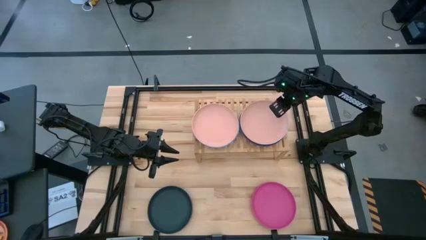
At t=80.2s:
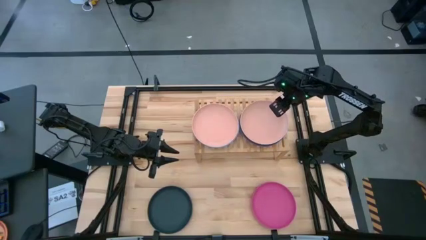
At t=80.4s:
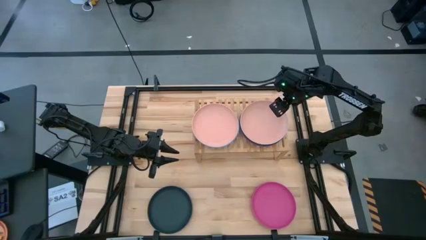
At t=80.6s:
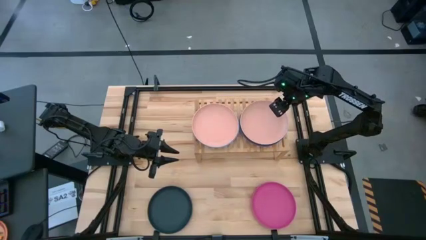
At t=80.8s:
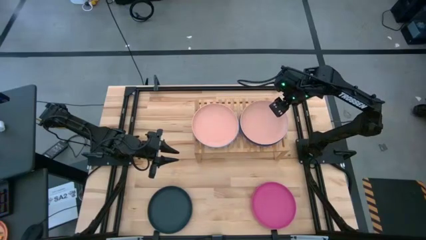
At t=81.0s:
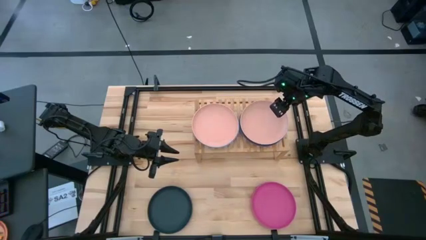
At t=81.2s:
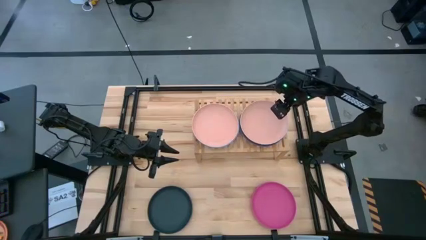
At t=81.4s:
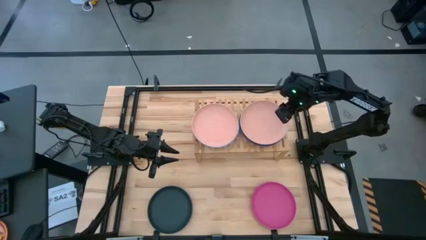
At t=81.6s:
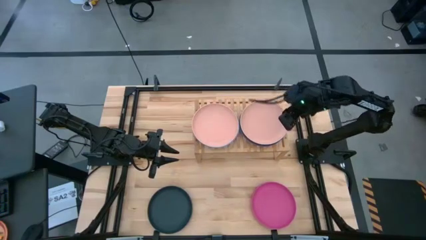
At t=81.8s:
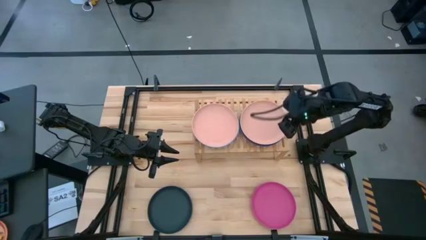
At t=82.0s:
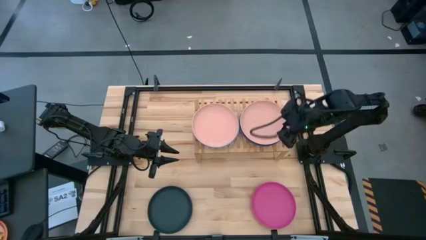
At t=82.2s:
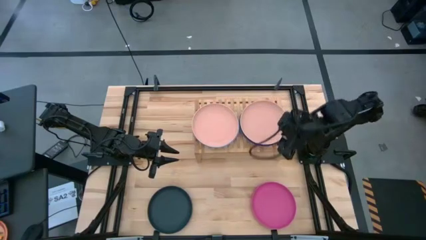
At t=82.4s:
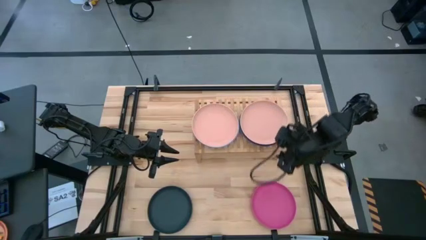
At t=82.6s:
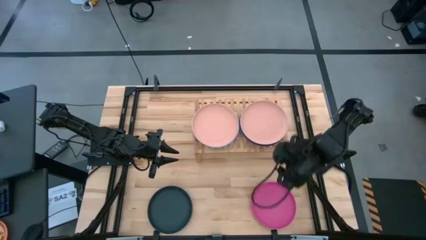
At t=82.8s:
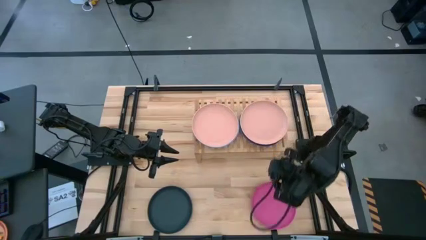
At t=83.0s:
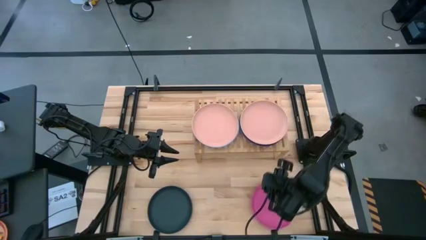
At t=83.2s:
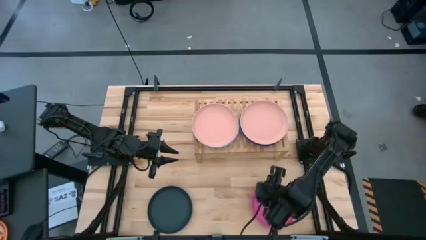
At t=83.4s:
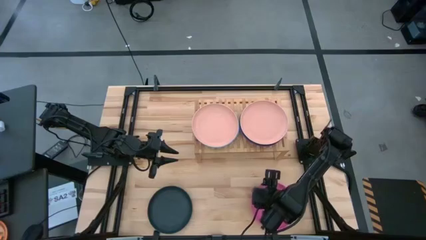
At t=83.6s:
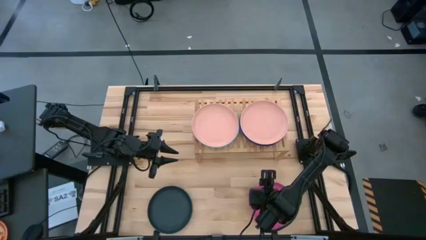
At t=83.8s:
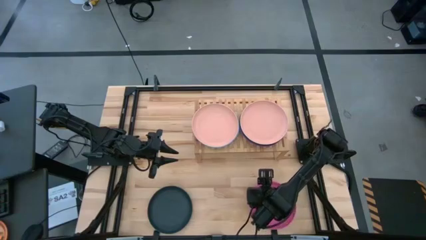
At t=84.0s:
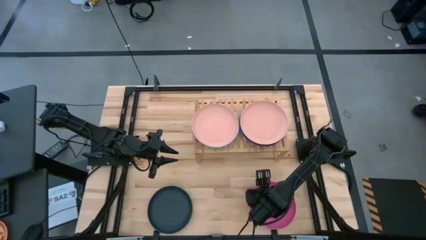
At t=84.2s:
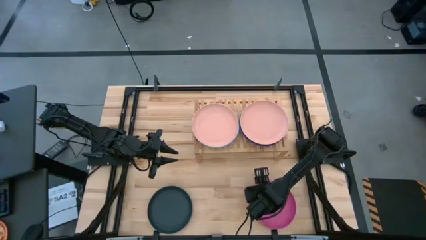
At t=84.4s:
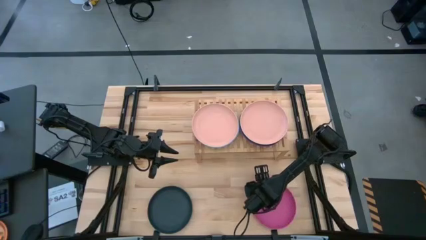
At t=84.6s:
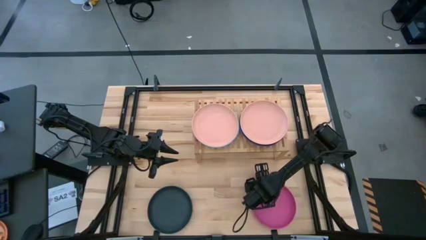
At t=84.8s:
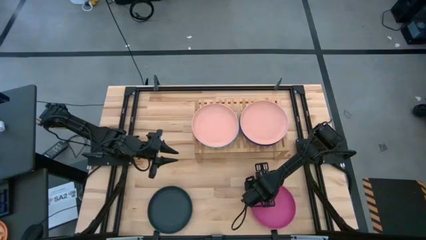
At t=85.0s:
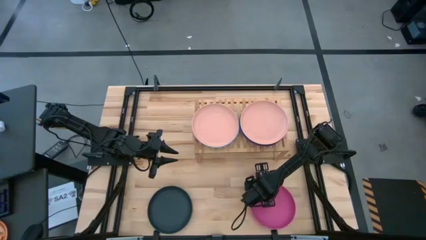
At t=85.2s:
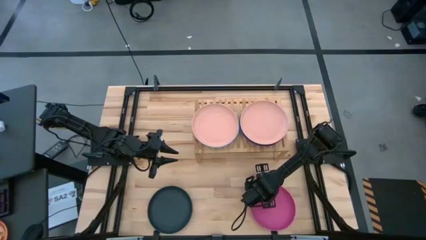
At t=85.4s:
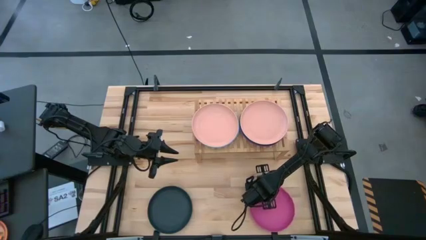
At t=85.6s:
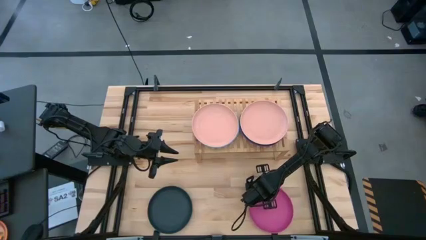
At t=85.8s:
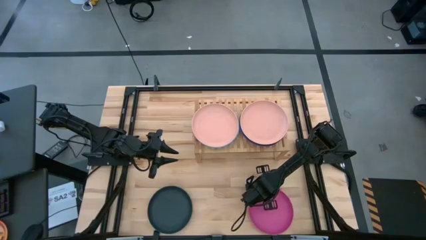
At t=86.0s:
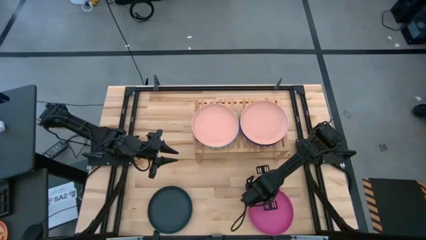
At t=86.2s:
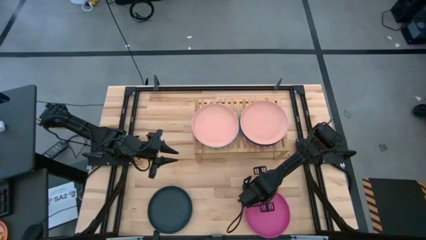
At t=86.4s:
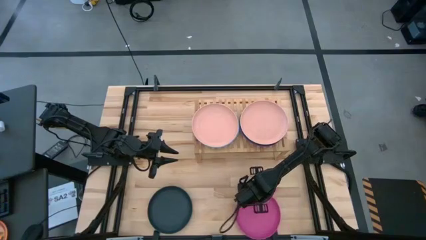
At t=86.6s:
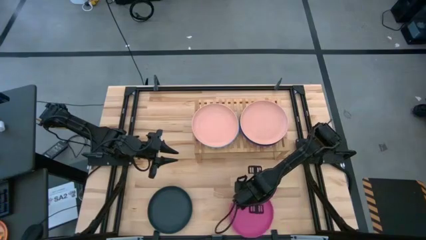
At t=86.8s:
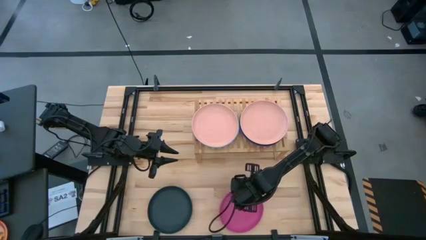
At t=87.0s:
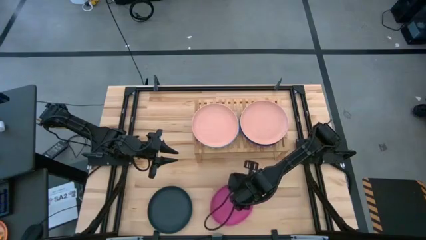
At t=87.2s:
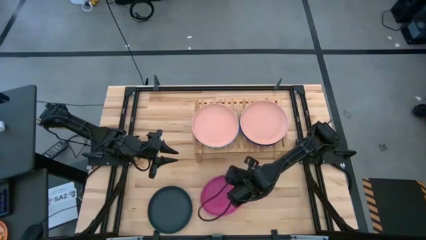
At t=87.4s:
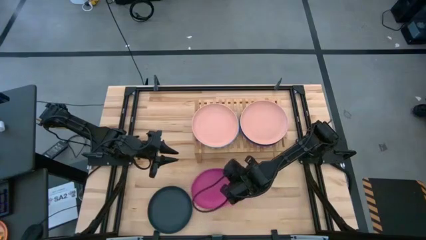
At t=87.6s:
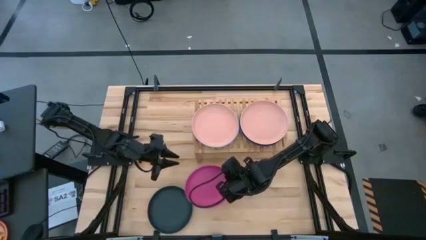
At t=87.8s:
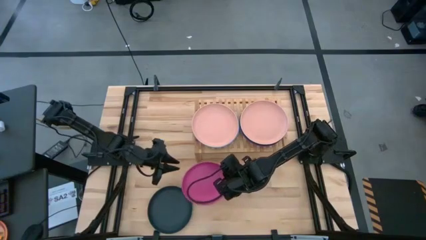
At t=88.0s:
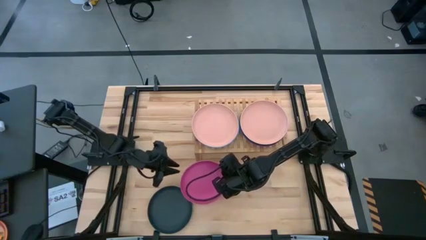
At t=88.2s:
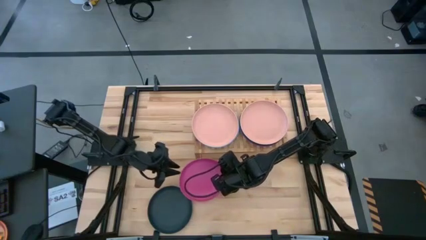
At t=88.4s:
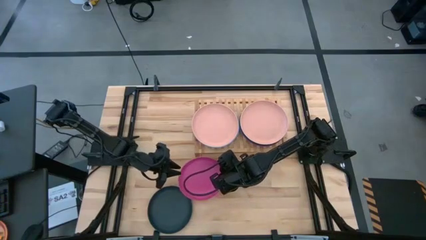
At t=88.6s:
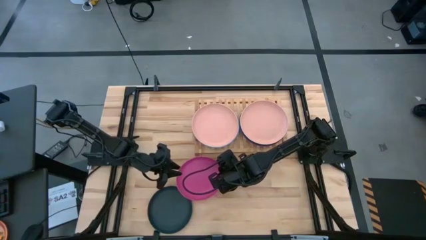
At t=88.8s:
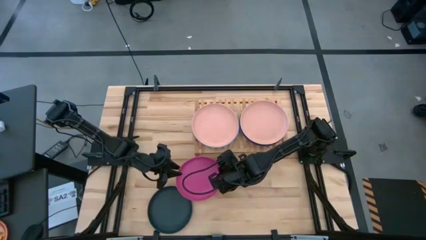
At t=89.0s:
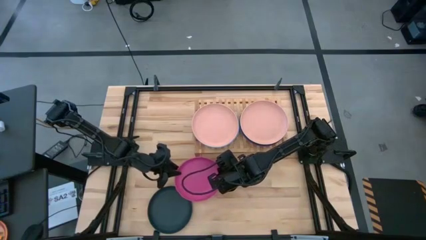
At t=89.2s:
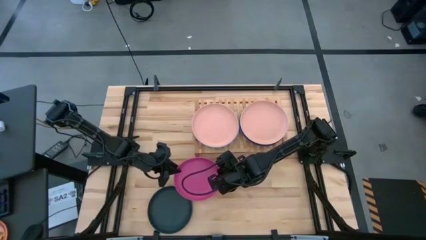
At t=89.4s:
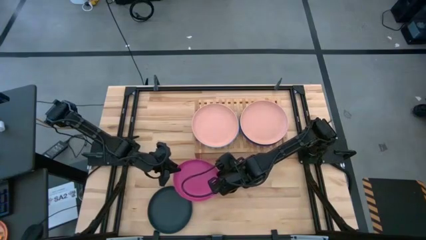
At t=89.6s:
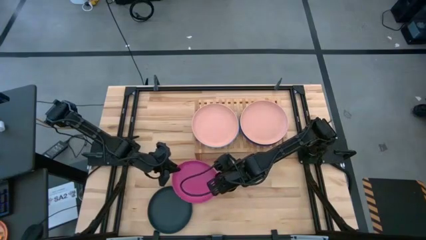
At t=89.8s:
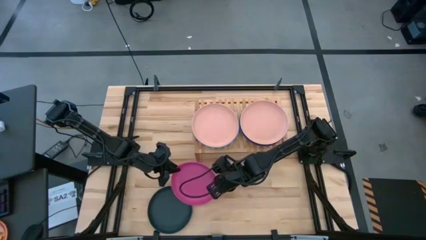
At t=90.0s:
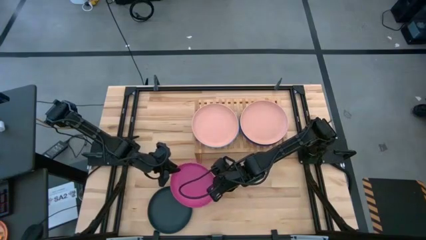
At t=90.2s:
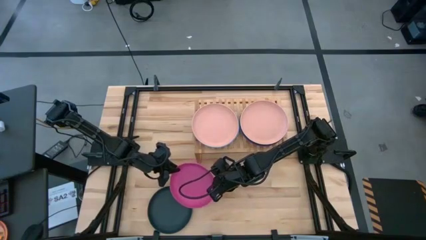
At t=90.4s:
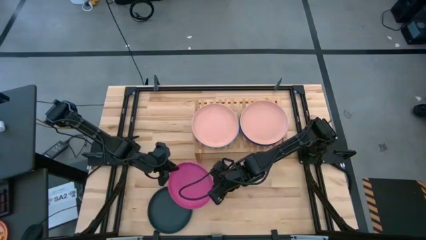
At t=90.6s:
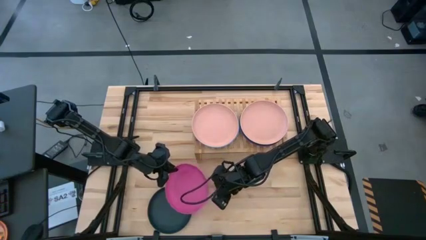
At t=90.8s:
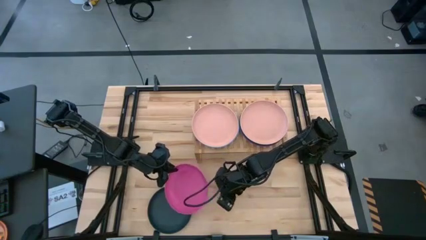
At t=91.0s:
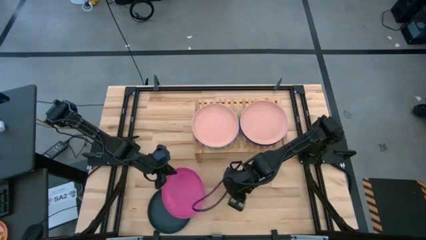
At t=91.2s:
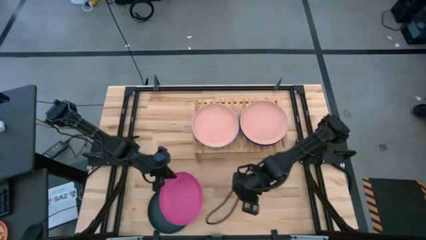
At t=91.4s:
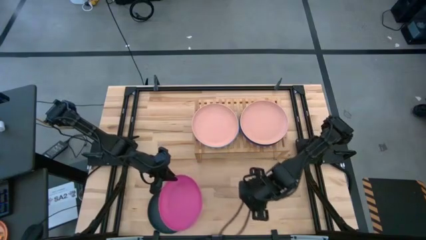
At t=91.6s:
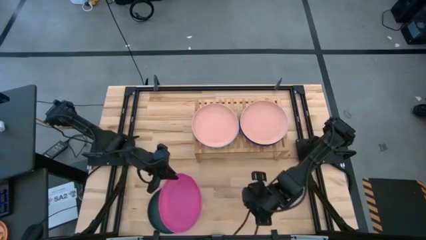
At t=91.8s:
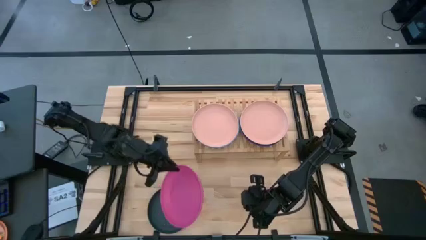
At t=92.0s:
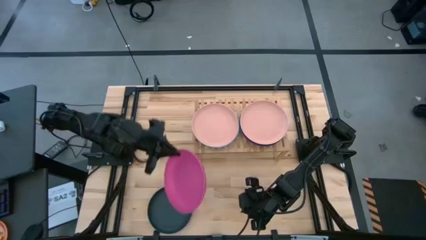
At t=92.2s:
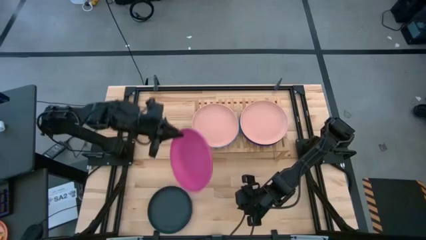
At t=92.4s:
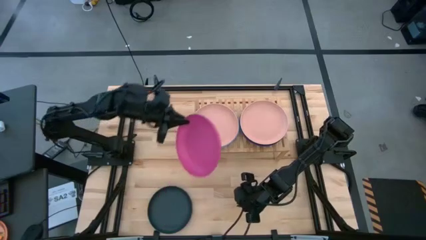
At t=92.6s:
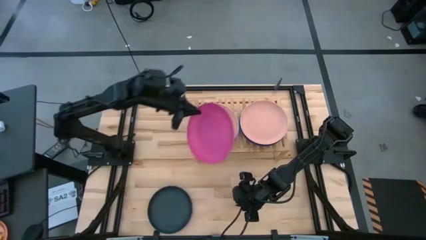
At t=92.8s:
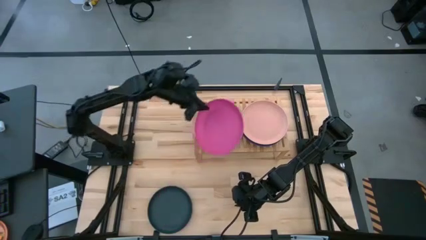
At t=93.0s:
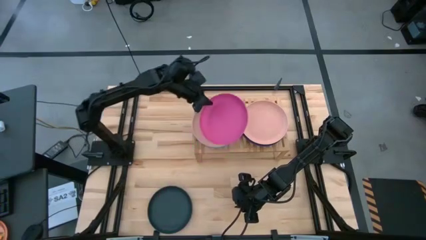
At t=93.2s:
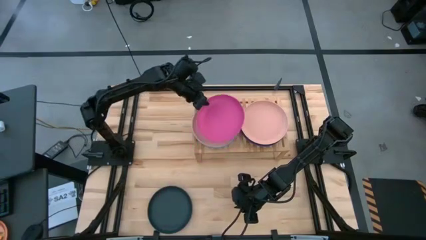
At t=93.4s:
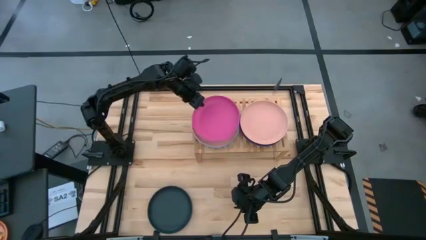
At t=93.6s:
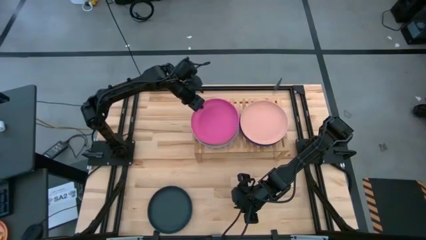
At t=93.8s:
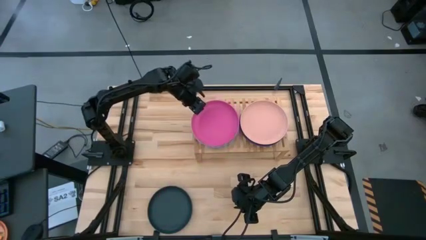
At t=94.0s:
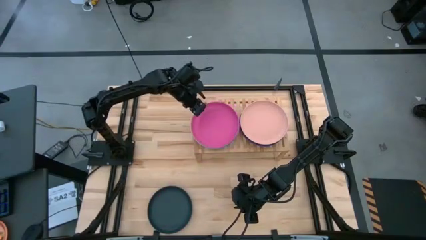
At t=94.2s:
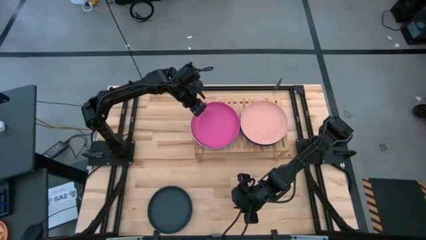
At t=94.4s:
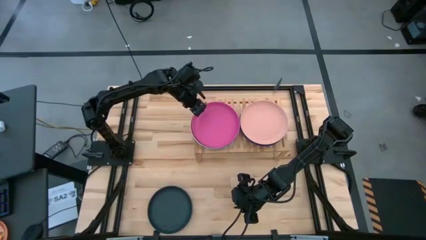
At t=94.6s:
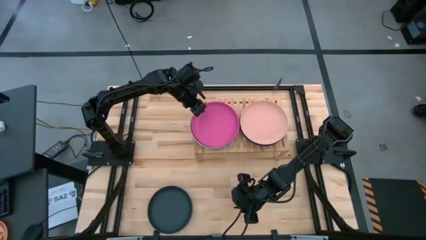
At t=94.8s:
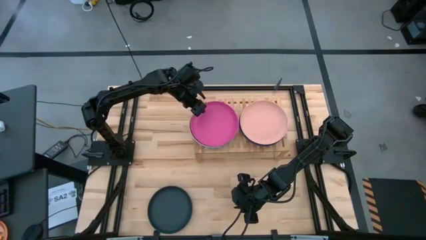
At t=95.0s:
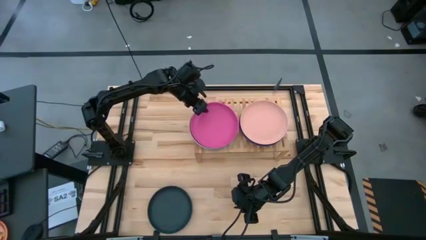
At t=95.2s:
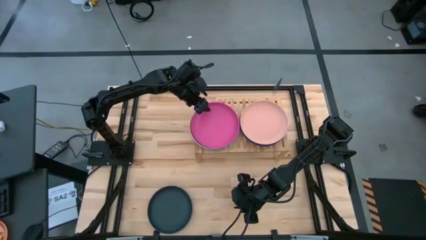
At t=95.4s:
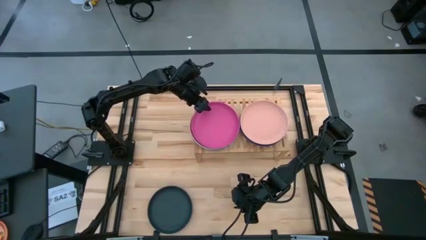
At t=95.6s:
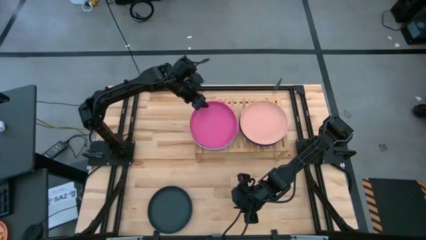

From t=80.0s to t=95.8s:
Task: Place and stack plates onto a shelf
Stack the pink plate on top of the left brown plate on the shelf

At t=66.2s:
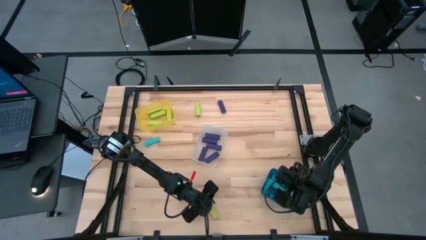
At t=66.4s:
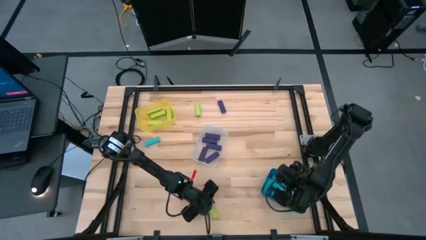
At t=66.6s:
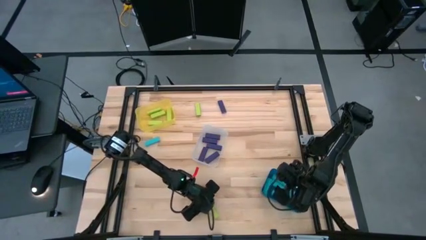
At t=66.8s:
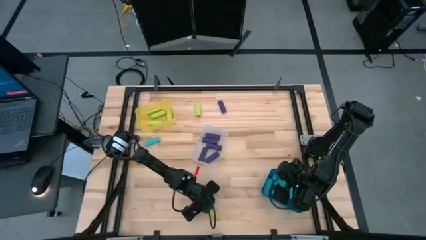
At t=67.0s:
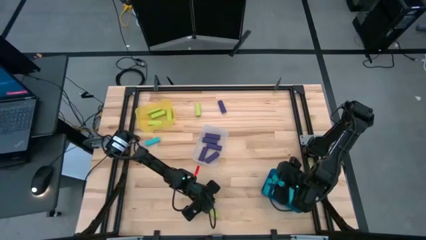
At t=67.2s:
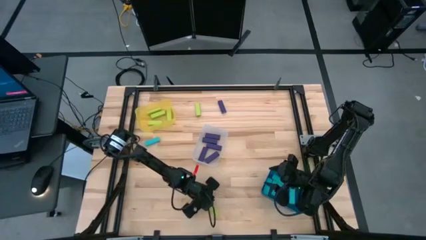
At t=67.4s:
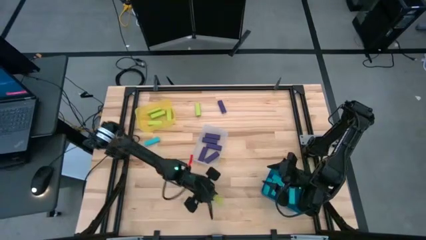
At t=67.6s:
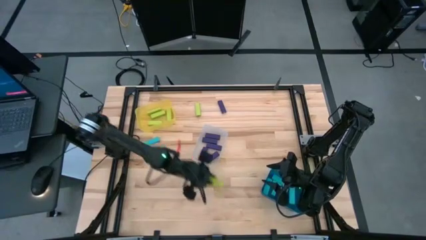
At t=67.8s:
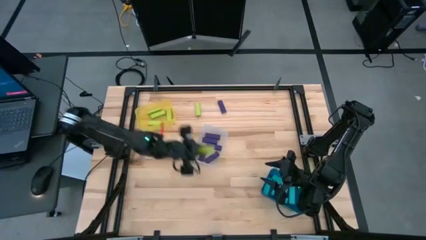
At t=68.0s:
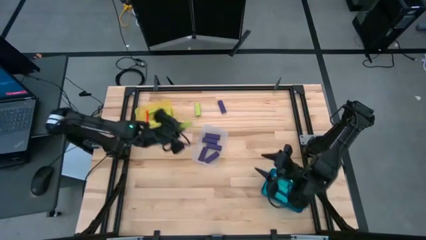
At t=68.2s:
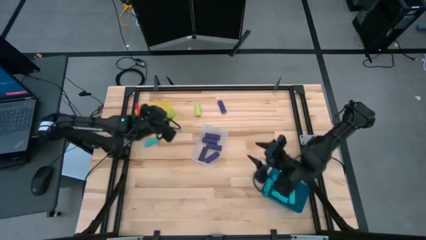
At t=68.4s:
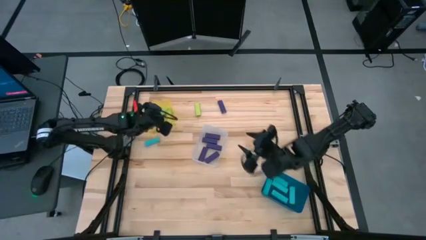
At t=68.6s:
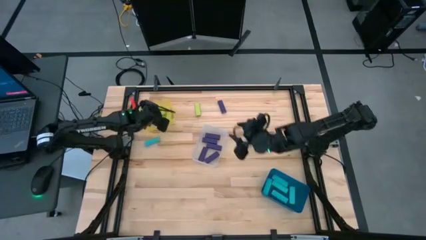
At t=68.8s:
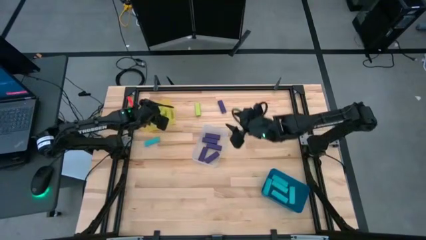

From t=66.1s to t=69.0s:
Task: Sort blocks
Put the bottom green block into the yellow bin
